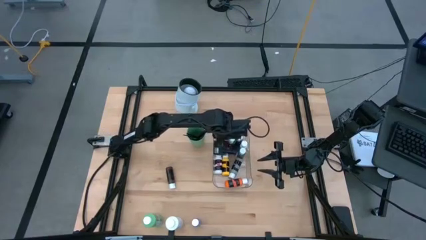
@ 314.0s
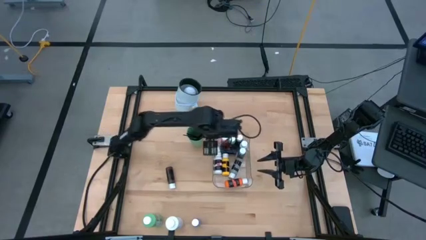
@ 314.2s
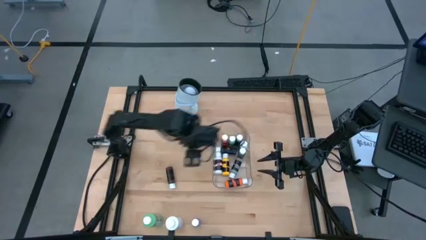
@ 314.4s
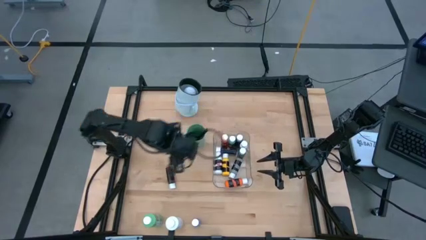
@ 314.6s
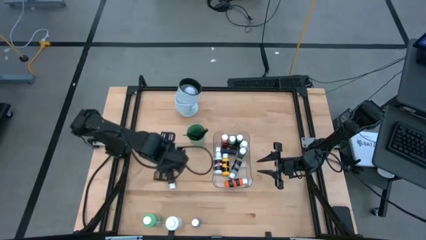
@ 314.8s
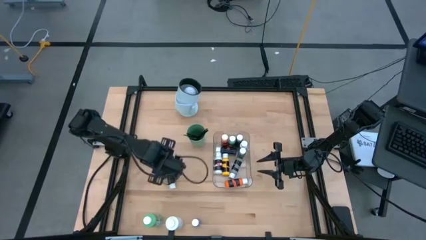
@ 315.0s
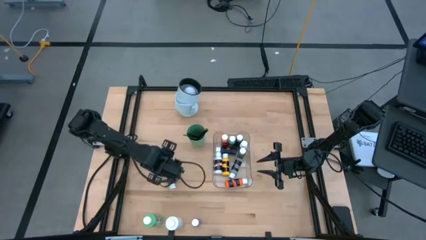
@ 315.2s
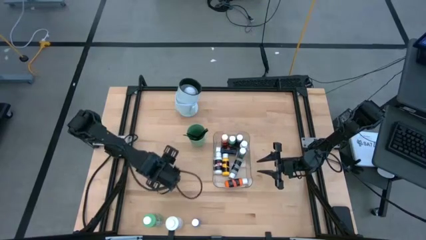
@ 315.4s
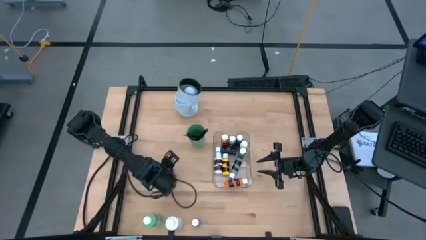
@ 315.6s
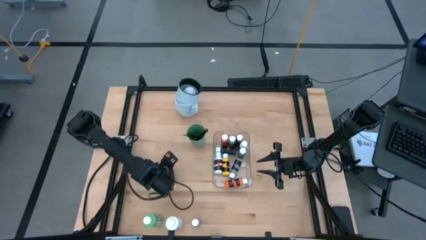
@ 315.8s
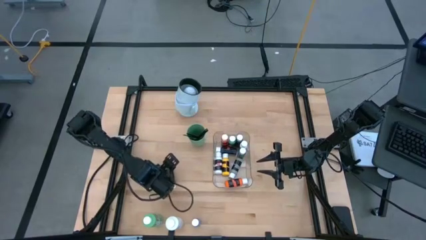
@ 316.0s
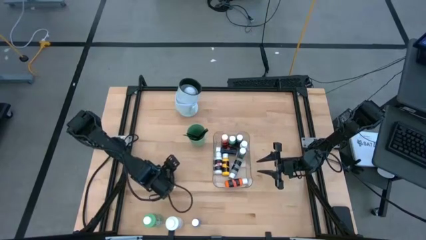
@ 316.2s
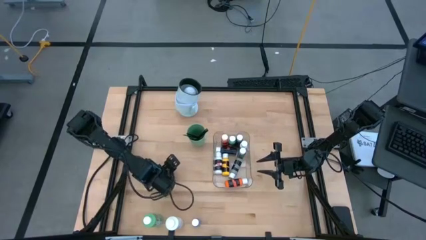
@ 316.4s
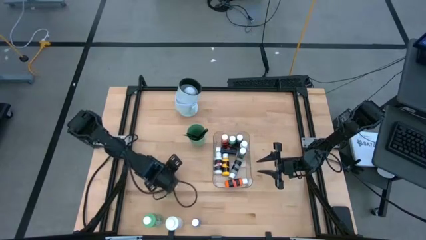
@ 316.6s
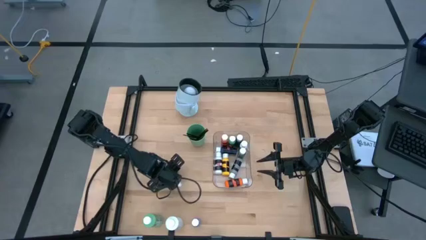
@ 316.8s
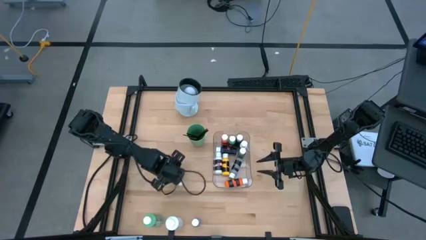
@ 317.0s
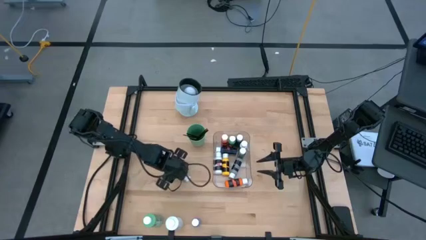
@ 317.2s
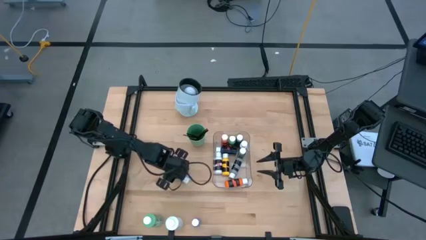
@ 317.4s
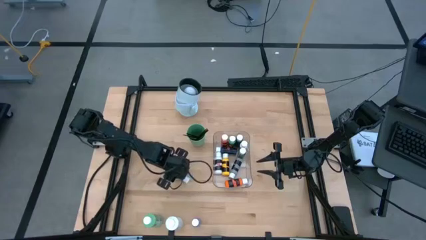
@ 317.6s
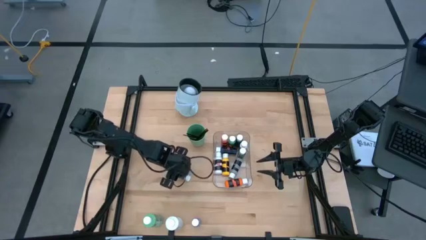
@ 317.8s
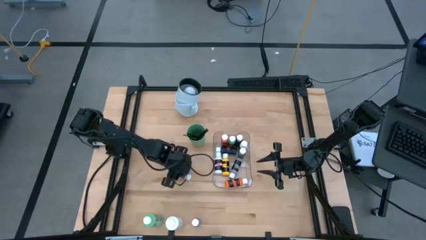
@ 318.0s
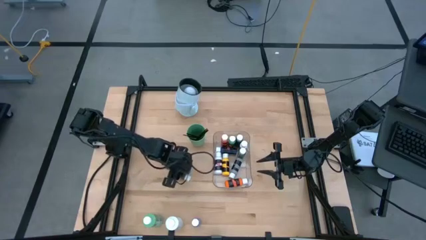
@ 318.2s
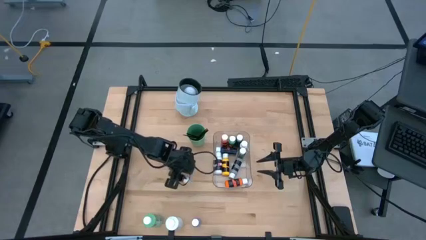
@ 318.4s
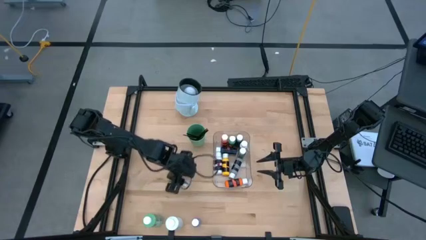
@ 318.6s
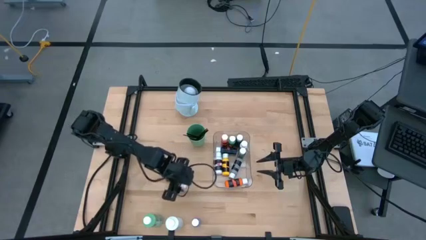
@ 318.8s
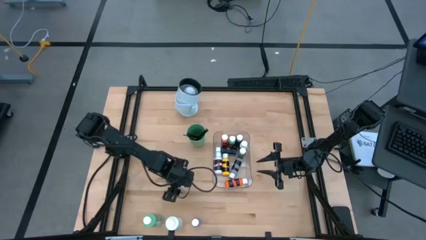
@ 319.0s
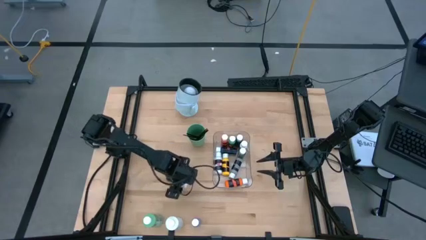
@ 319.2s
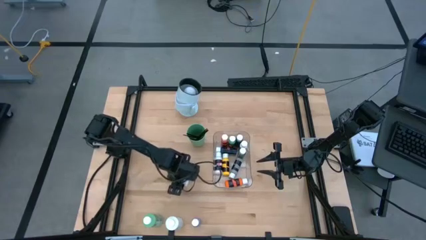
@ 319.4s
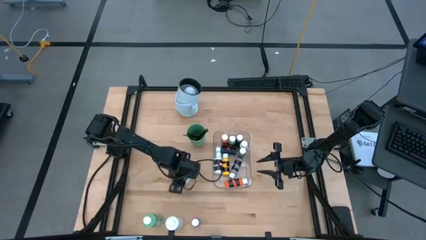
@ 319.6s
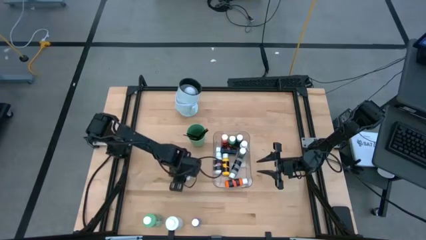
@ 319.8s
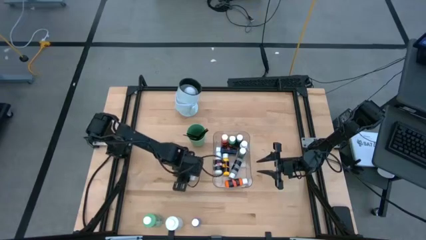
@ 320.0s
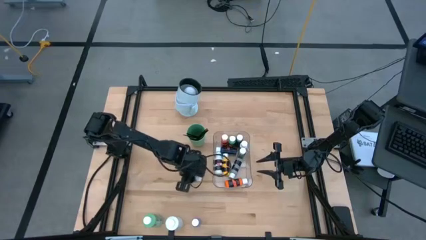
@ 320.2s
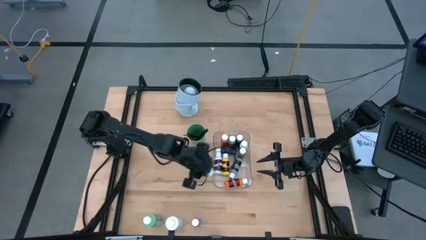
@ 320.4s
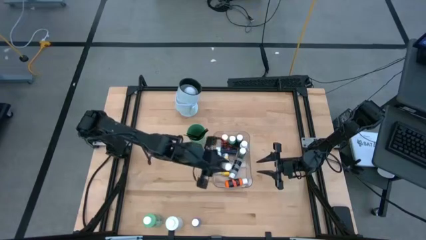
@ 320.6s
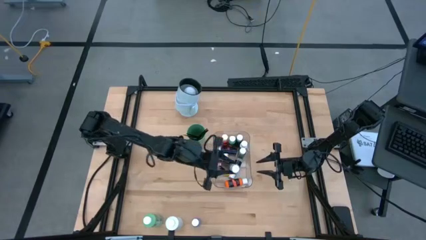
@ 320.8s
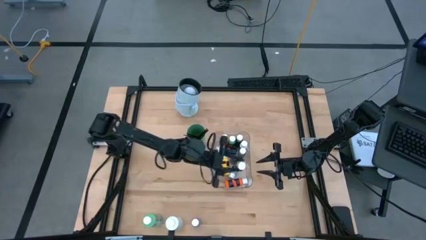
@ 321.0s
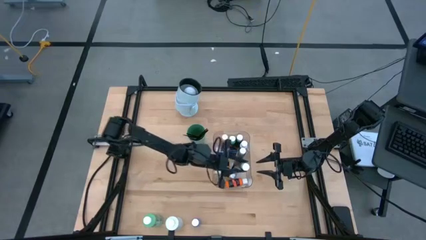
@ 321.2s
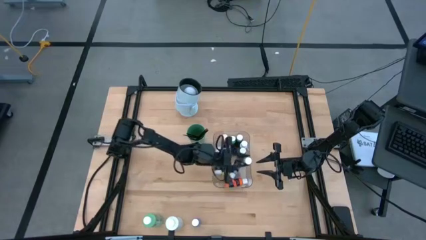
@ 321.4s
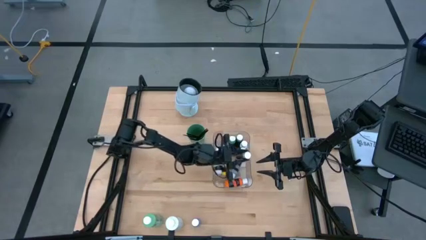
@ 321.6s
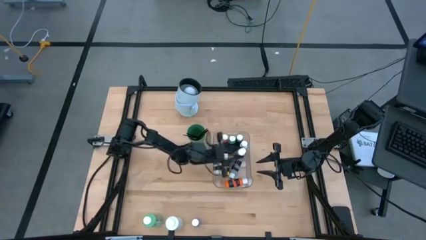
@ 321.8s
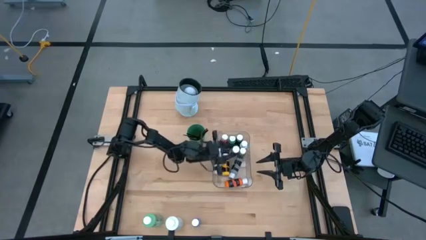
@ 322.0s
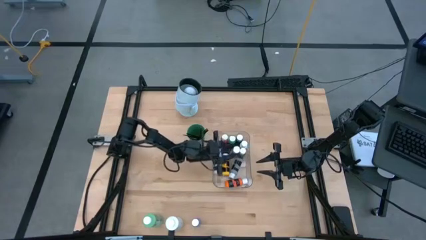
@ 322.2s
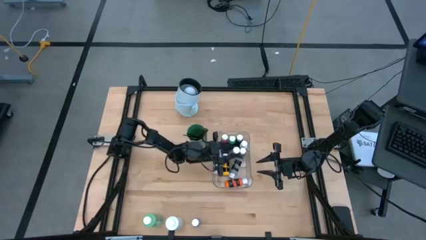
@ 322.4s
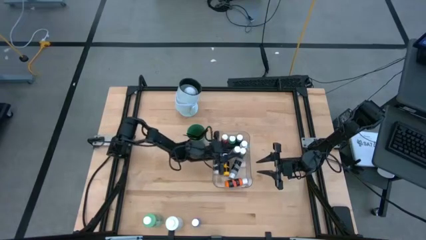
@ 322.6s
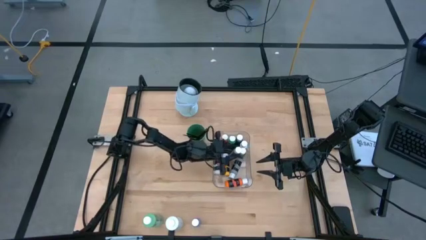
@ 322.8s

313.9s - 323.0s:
Task: Pick & Place Paint Supplies
Put the small brown paint bottle into the transparent bin

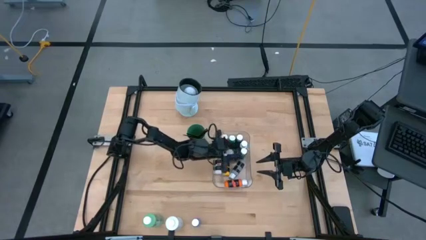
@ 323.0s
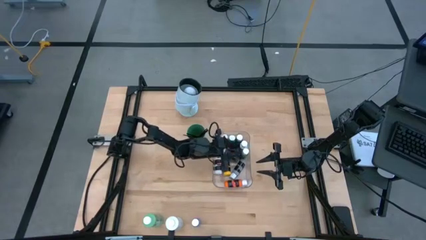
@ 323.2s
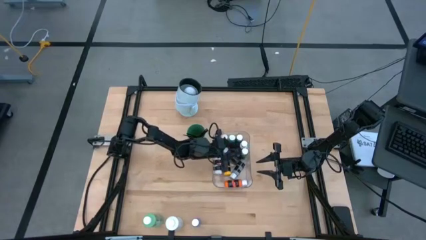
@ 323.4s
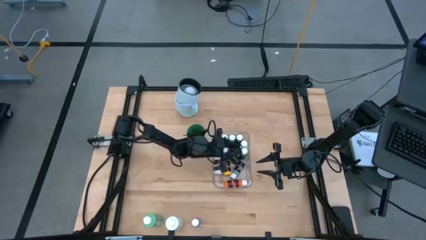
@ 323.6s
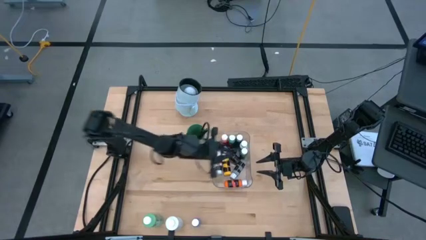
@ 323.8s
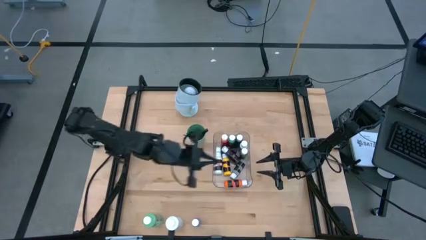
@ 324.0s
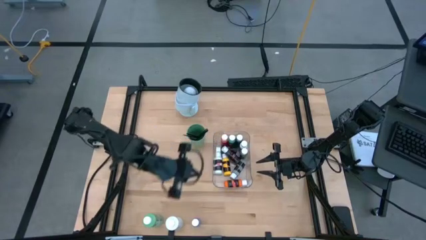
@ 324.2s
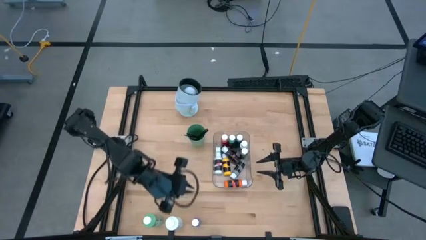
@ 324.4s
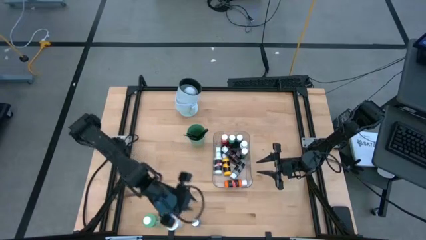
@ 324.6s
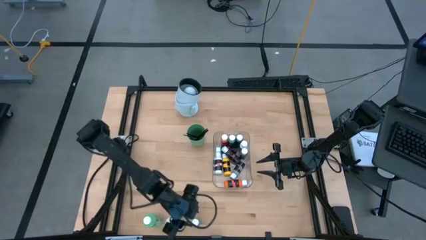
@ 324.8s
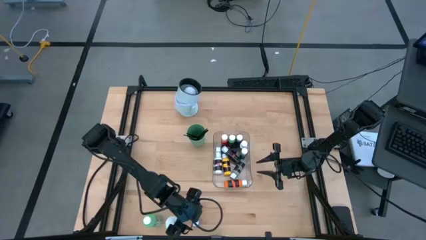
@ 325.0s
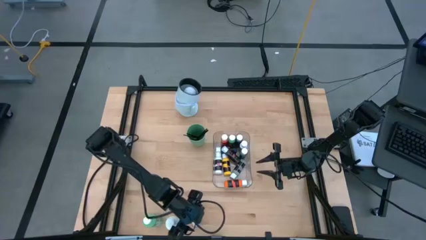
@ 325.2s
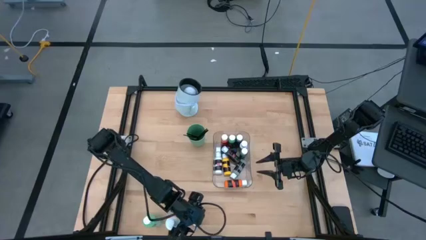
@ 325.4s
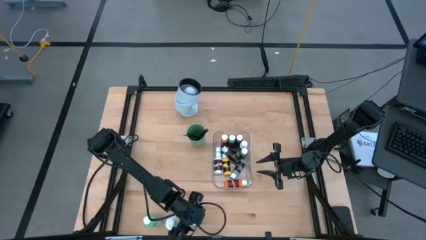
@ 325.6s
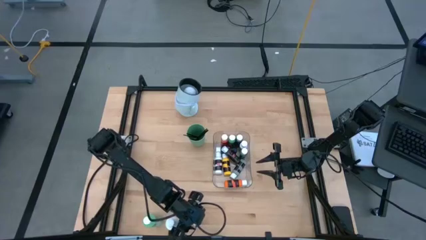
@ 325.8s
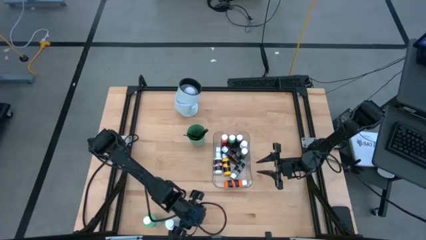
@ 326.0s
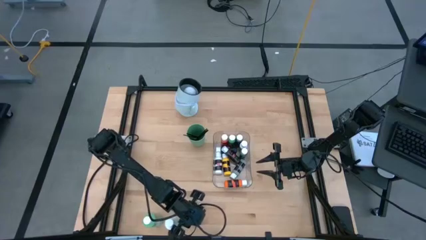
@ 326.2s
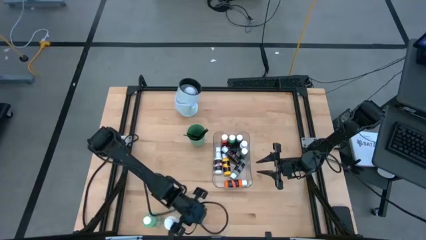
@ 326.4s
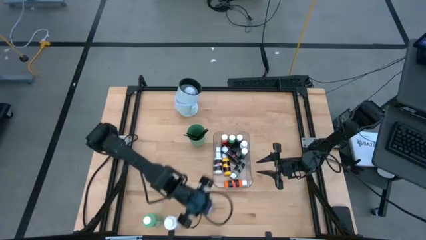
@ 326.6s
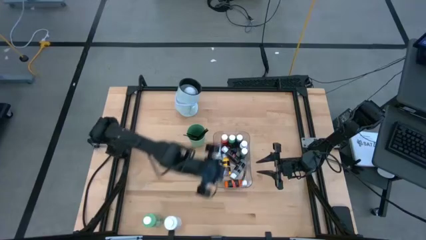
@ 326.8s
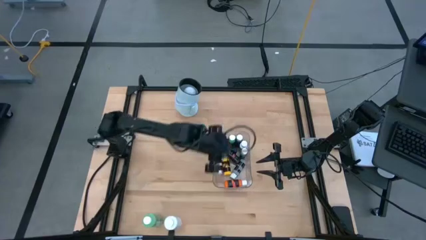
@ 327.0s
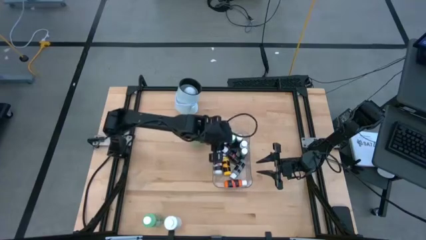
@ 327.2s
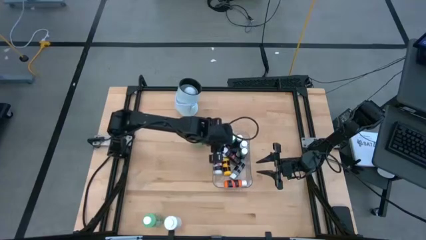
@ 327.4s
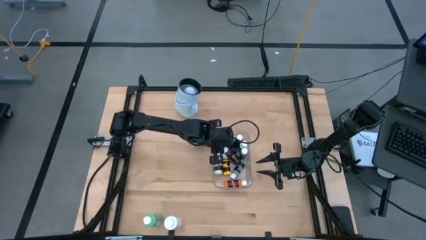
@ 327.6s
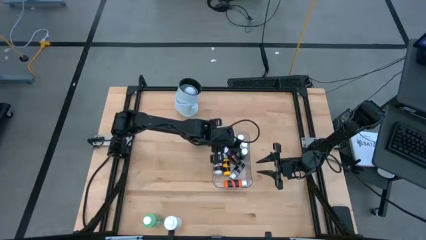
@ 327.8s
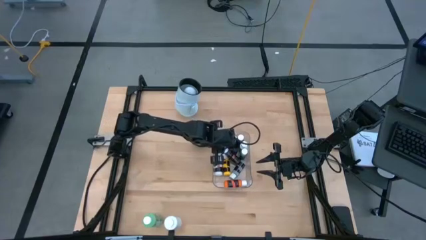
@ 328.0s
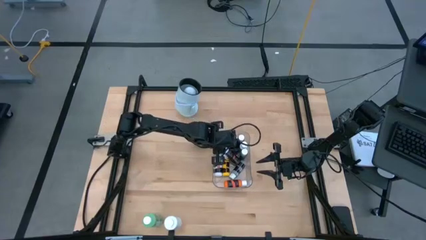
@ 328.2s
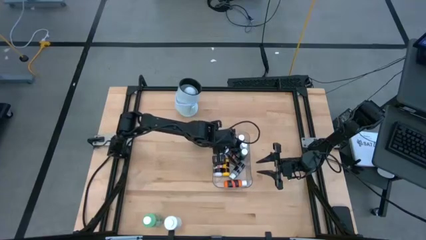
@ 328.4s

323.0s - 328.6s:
Put the small blue paint bottle into the transparent bin

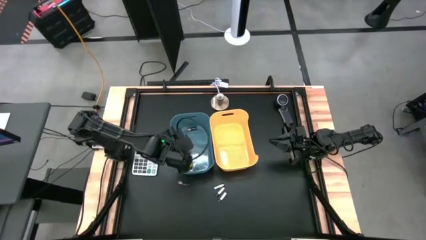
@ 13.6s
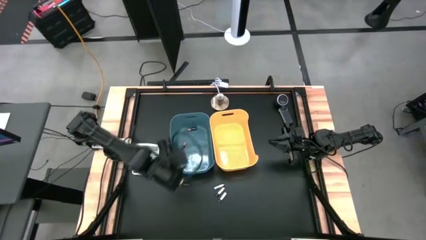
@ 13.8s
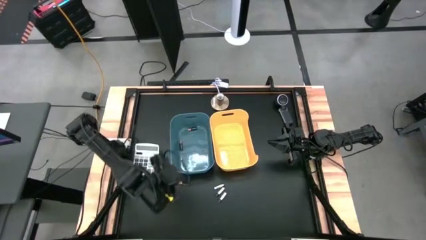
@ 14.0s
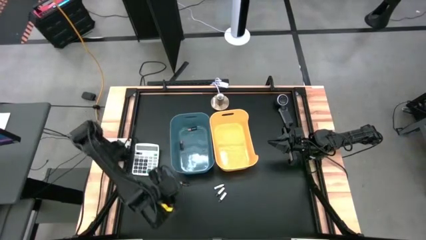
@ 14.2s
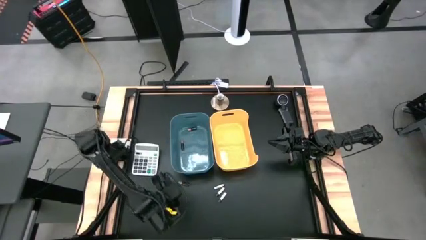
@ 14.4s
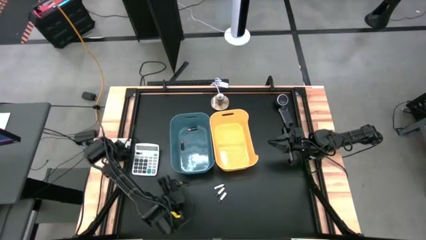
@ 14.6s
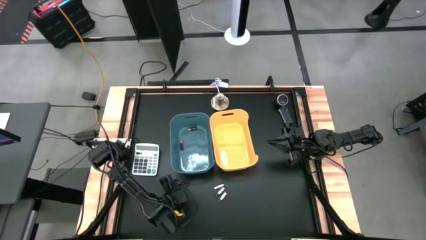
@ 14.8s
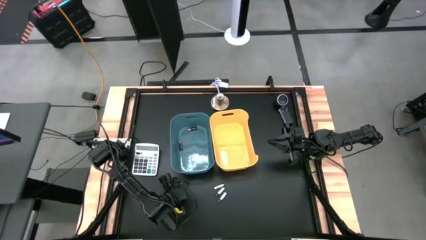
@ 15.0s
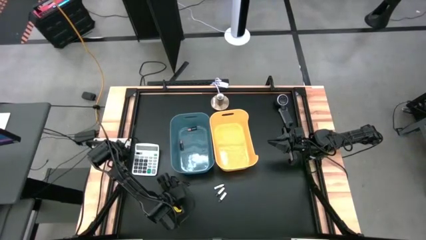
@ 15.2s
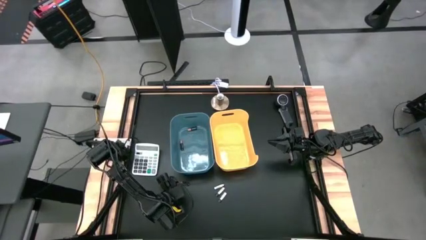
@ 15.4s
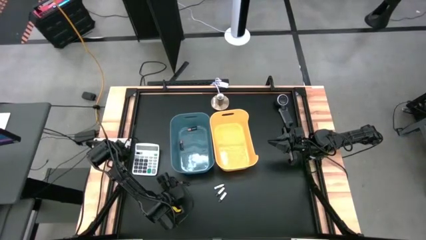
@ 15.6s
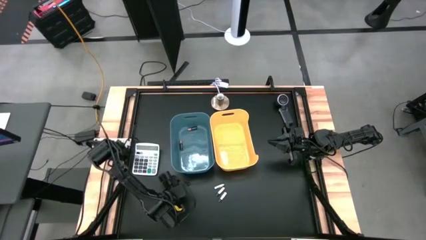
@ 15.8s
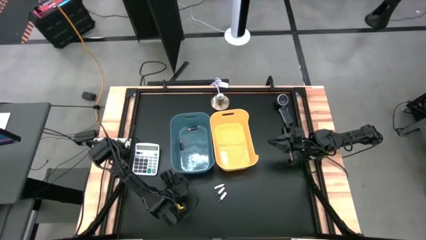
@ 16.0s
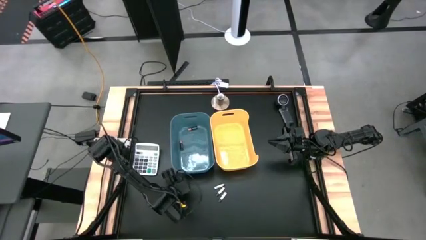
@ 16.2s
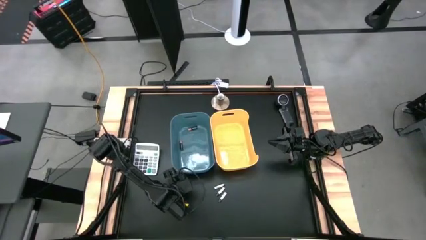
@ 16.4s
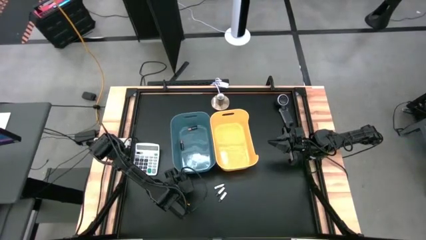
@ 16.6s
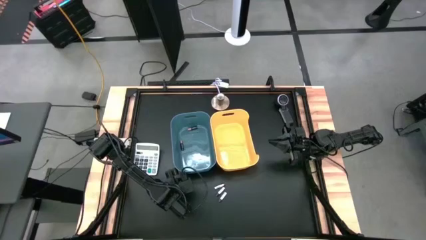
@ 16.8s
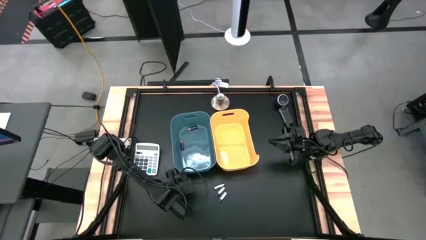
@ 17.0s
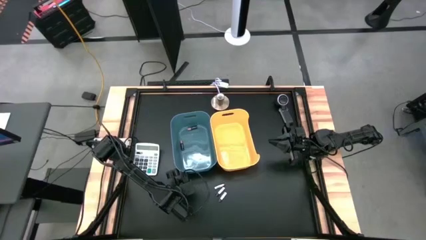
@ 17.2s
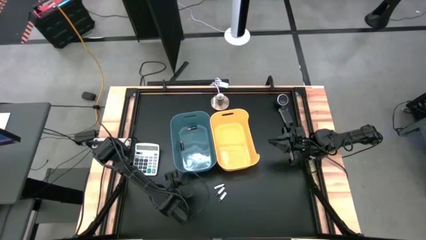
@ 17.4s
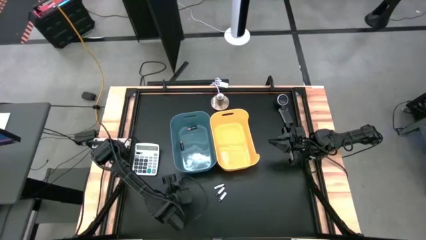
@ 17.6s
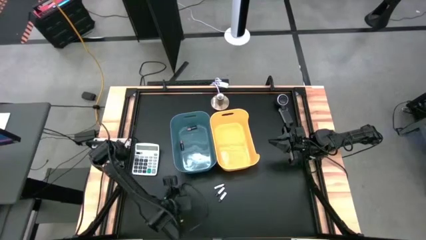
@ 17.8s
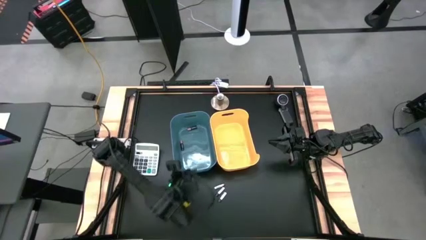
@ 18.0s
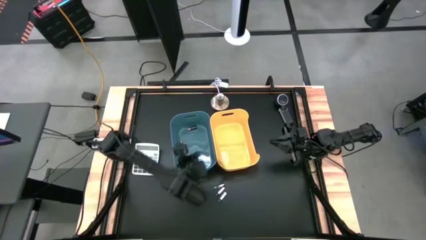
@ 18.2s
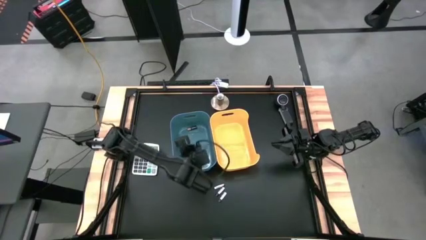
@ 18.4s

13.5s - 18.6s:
Task: Sort batteries
Put the black battery into the blue bin
